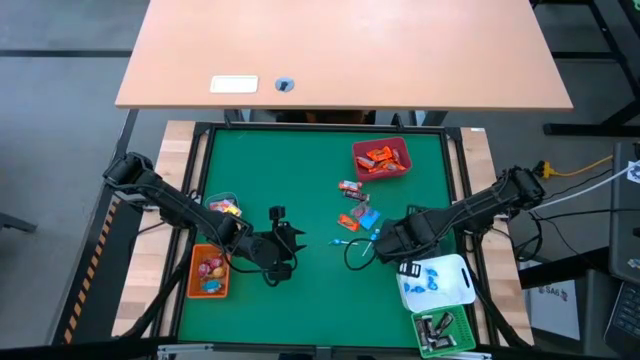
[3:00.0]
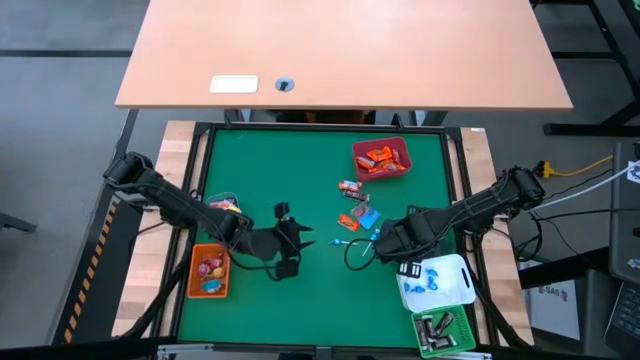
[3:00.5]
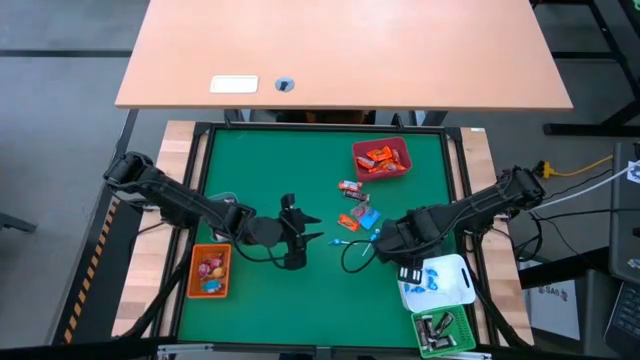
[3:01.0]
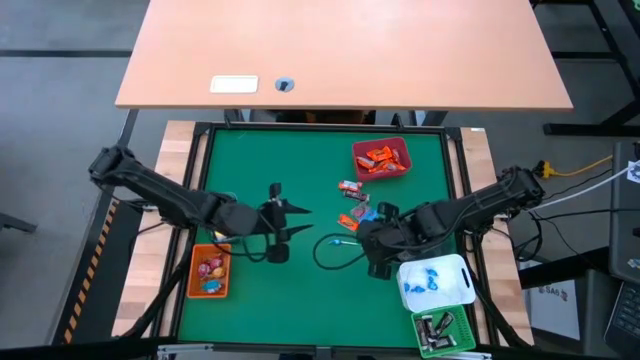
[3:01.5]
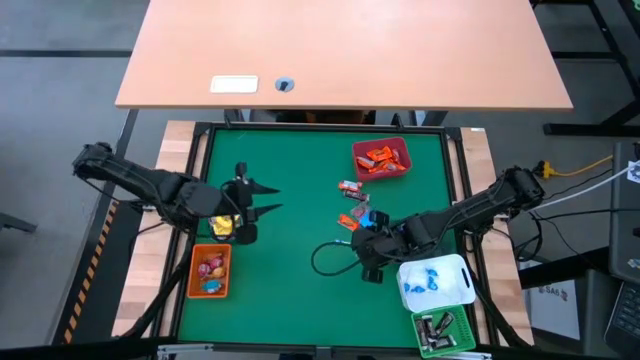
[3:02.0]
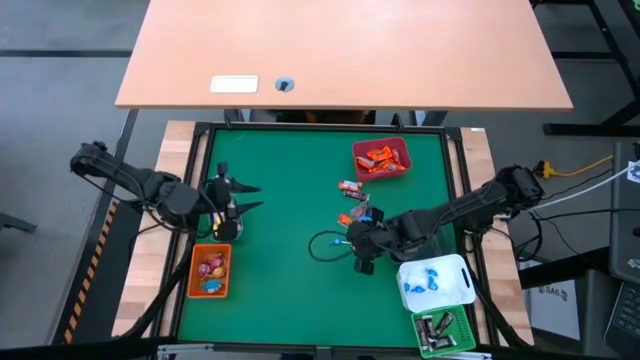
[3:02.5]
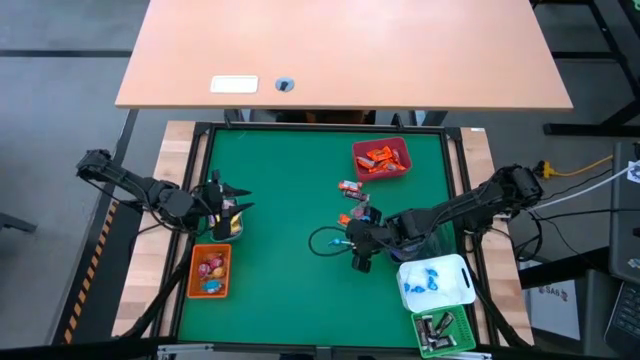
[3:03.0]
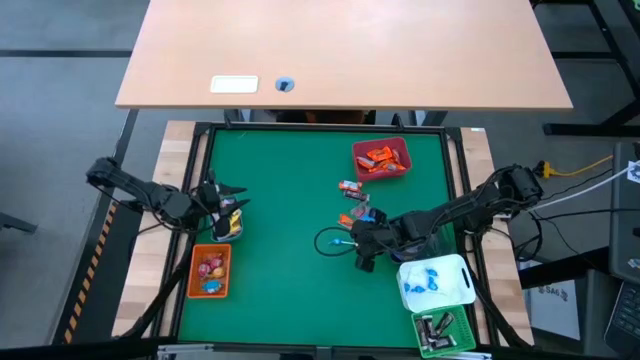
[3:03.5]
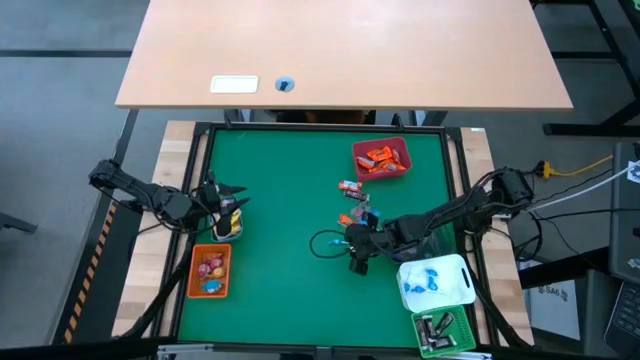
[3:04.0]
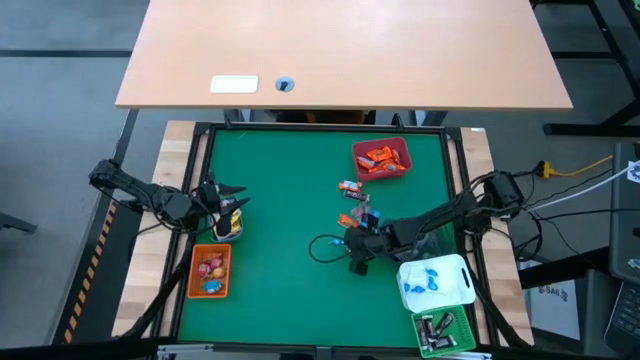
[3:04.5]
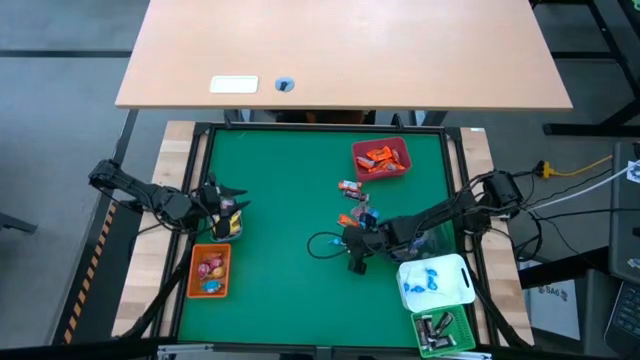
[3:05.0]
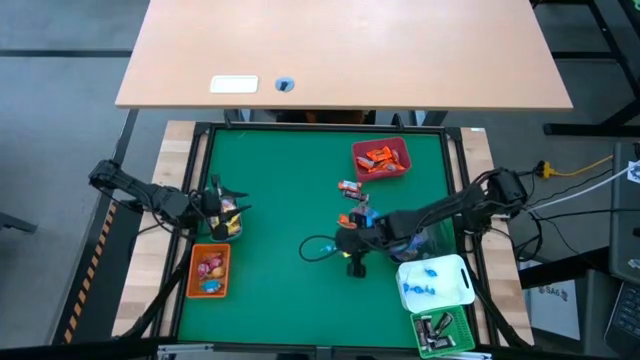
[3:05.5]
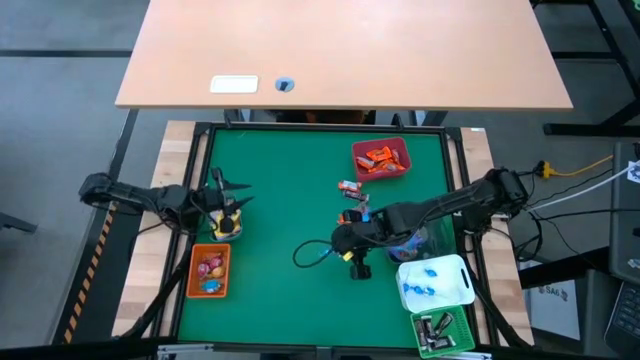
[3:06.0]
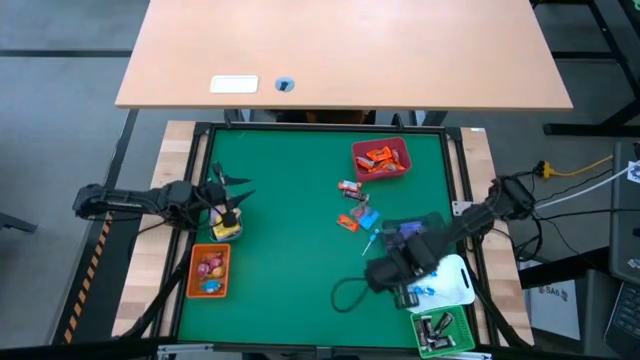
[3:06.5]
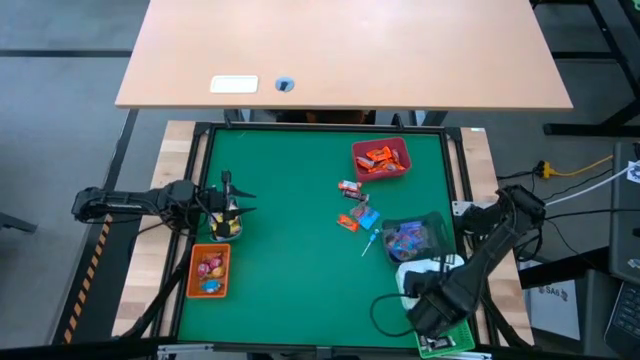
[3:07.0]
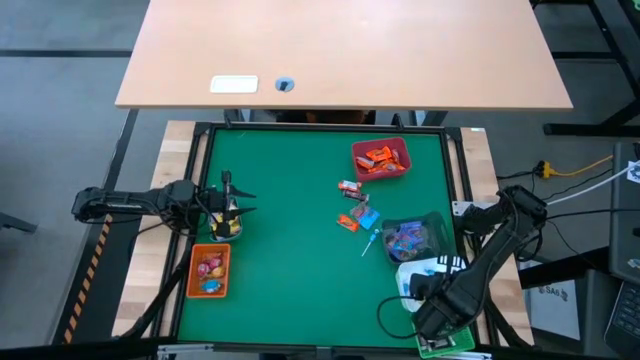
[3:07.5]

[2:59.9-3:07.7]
Task: Sort candy
Put the blue candy into the white bin

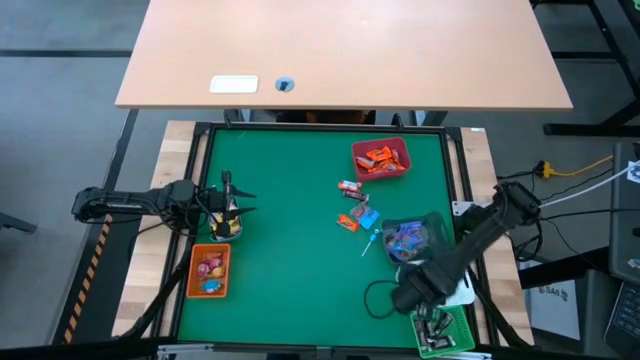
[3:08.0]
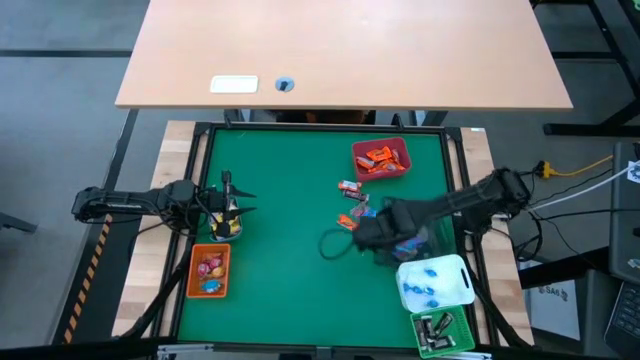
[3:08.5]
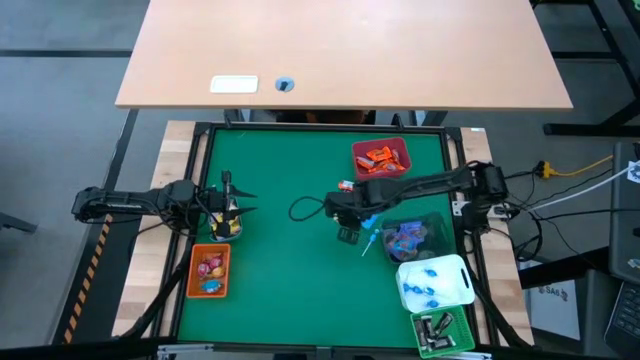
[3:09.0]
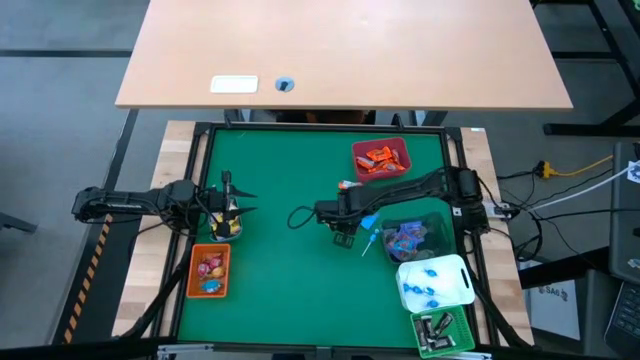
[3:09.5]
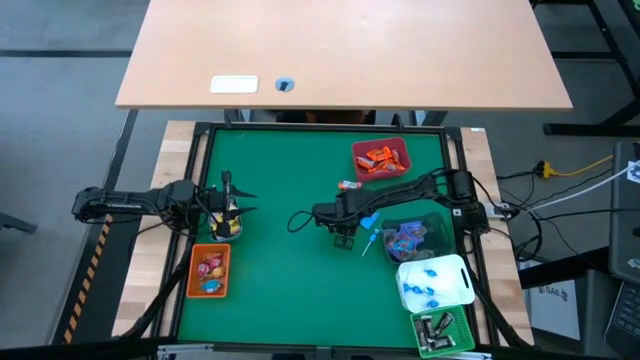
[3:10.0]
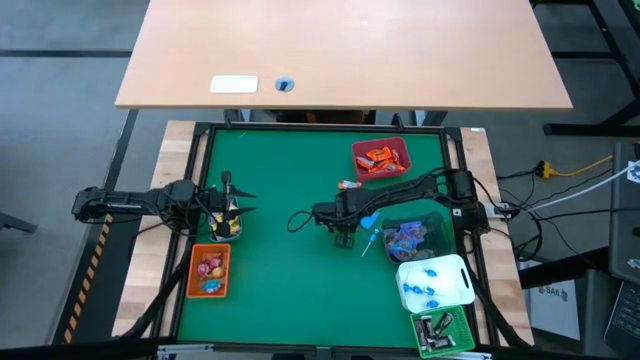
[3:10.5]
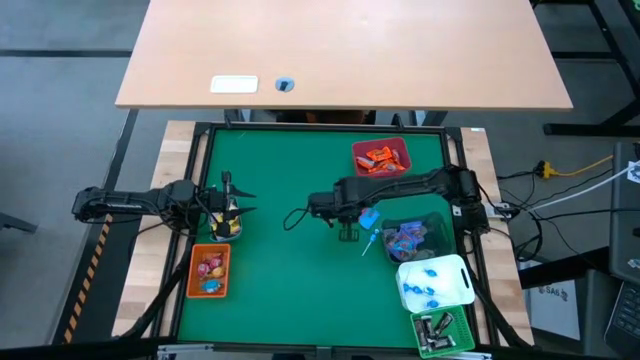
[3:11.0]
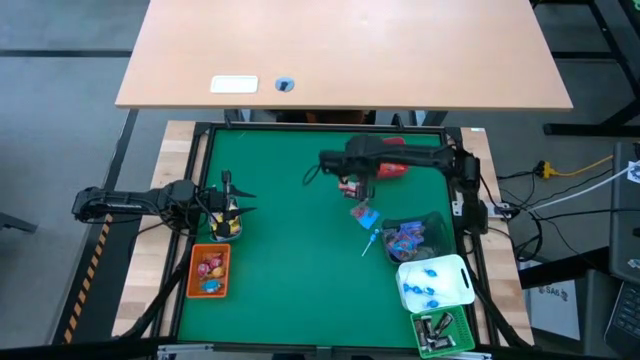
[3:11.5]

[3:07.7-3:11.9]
Put the orange chocolate bar into the red bin

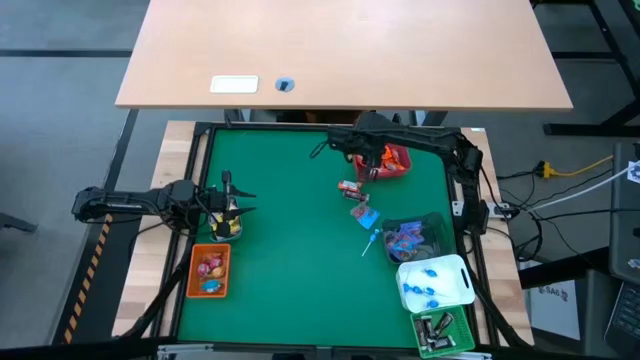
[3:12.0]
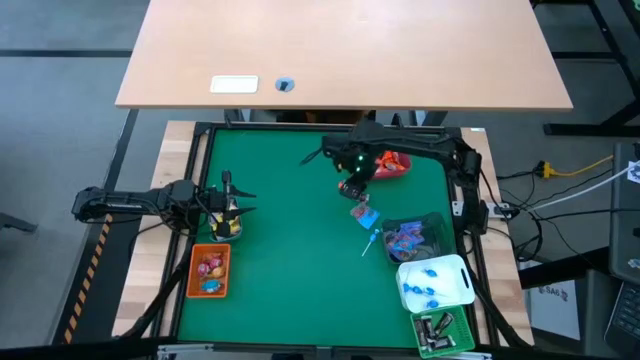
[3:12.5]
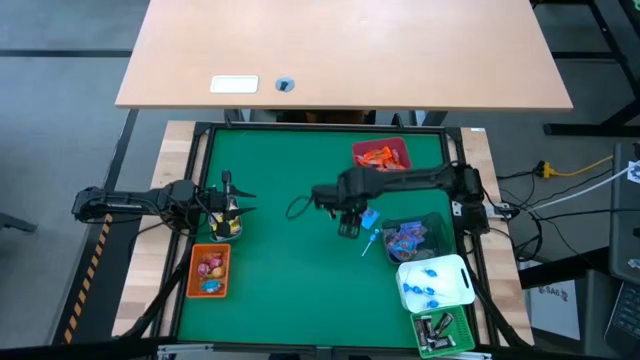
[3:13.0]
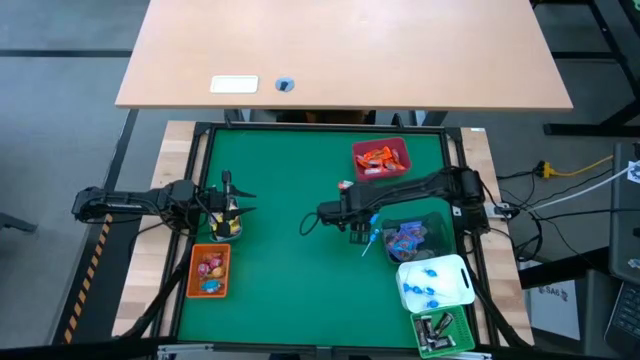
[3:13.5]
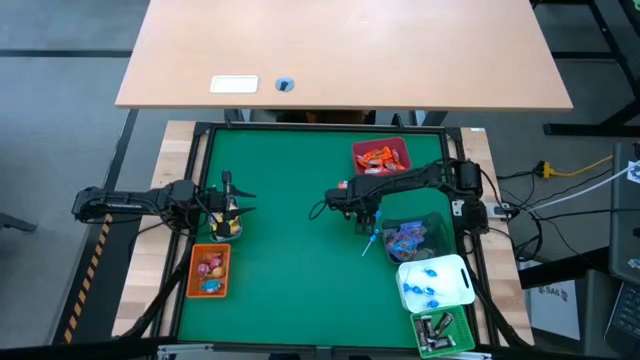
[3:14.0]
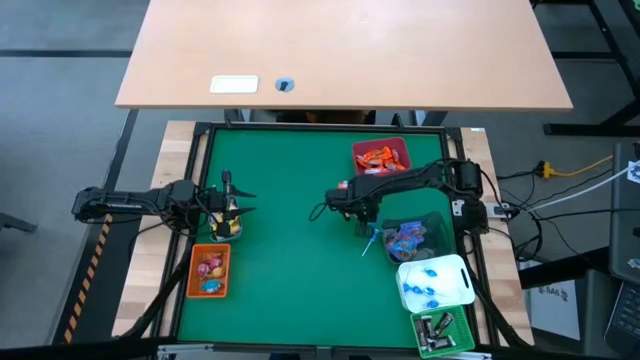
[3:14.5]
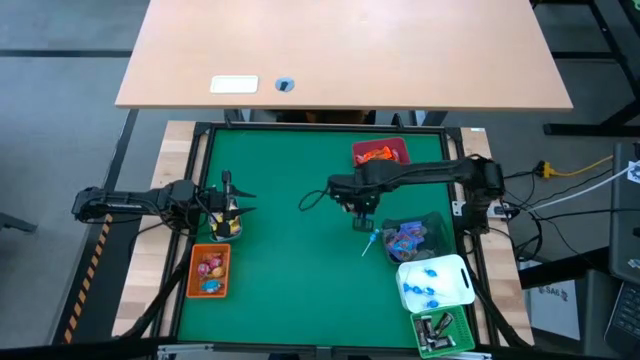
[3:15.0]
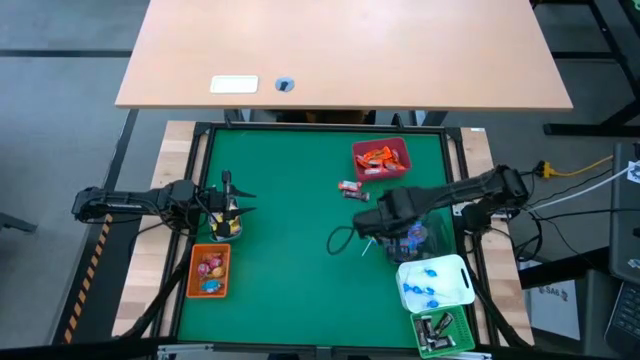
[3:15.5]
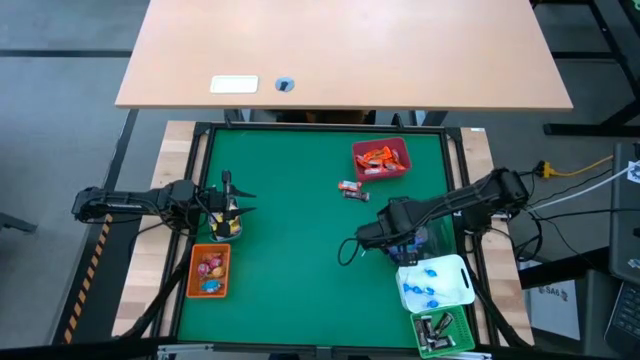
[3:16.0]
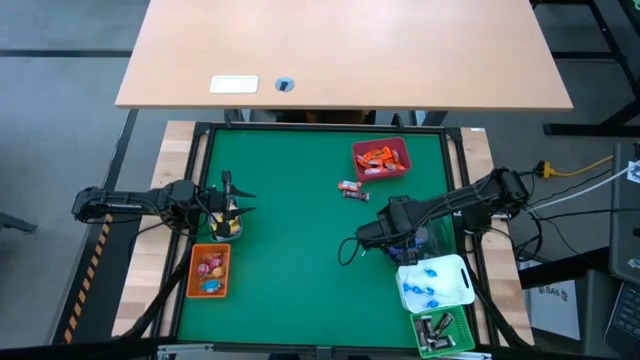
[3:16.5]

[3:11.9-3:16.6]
Put the blue candy into the black bin

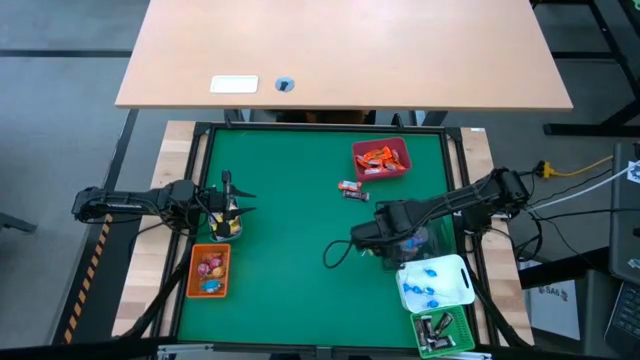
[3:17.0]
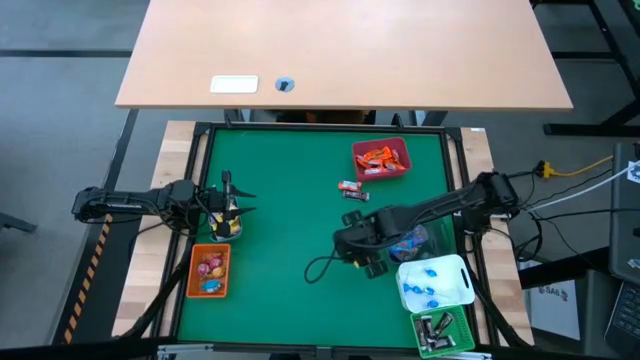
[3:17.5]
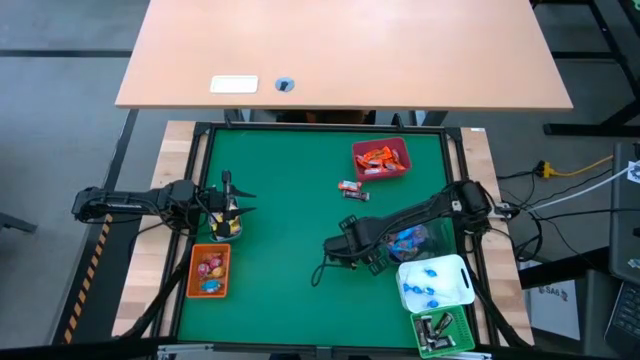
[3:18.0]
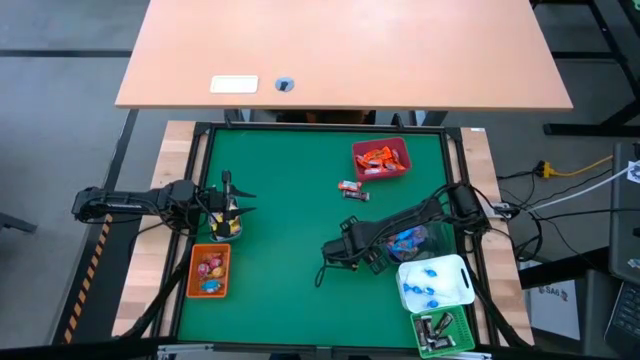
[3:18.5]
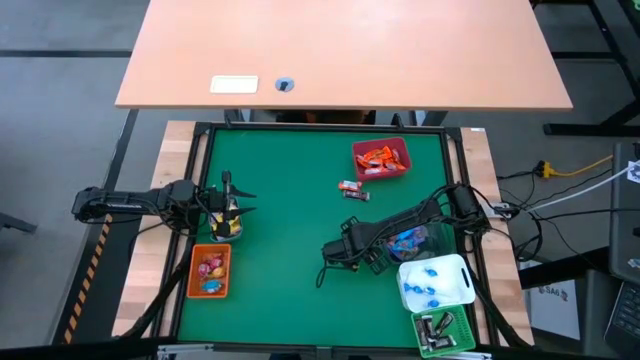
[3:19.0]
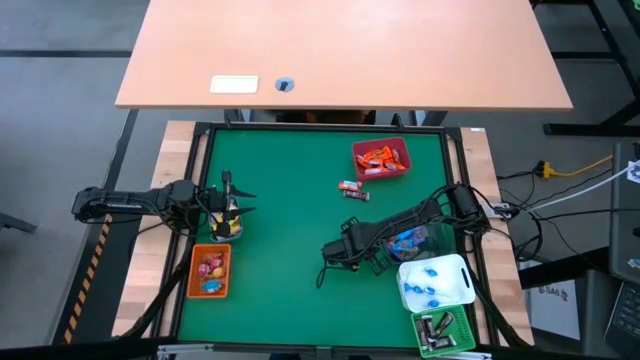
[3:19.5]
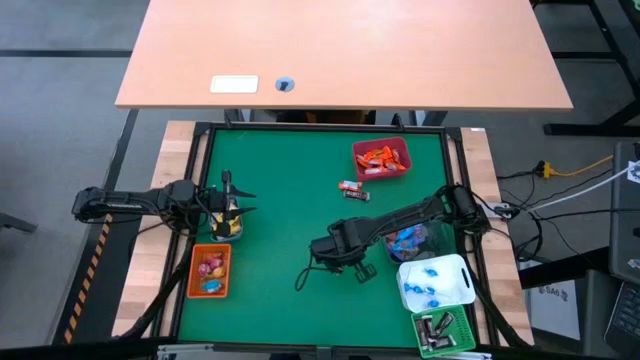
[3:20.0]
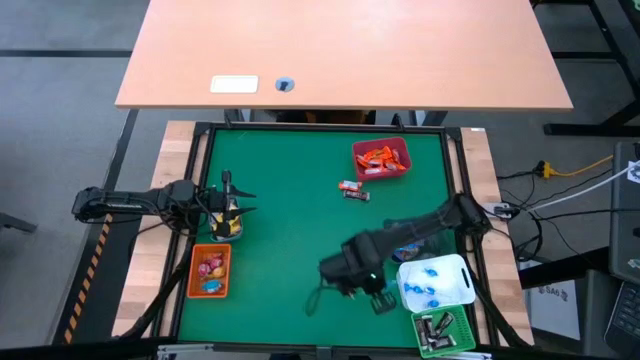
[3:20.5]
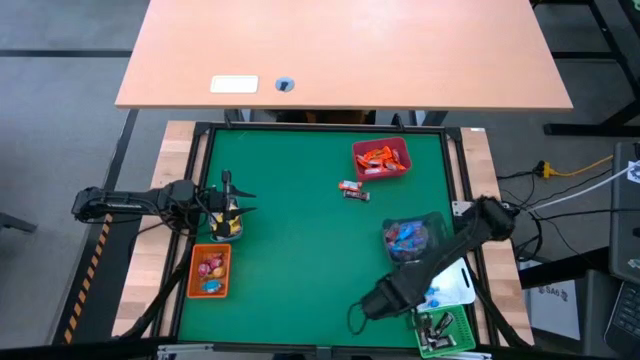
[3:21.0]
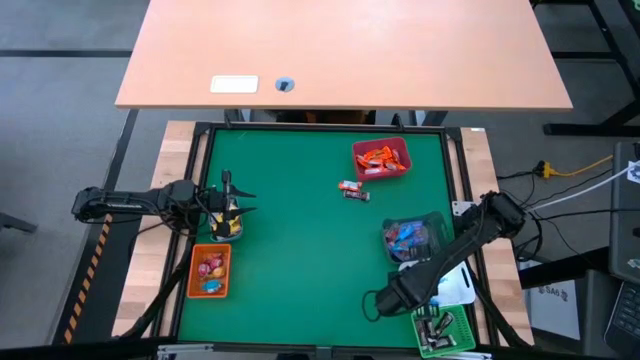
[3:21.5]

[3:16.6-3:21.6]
Put the blue candy into the white bin
